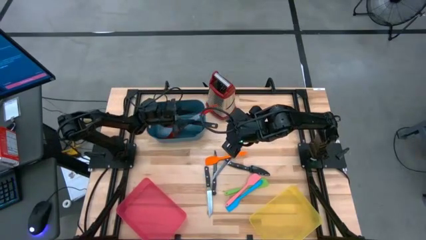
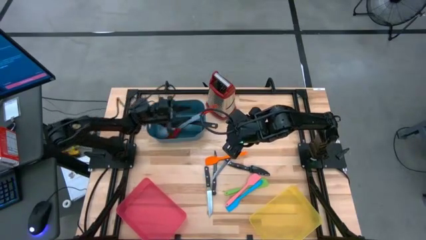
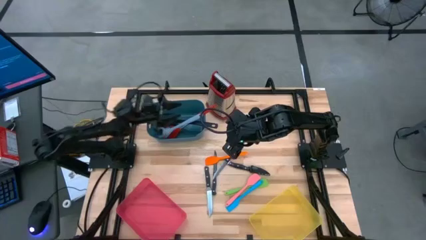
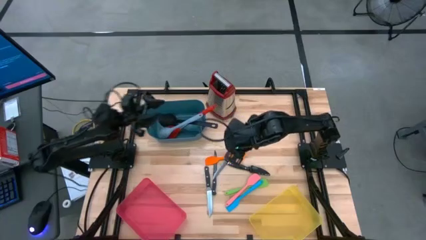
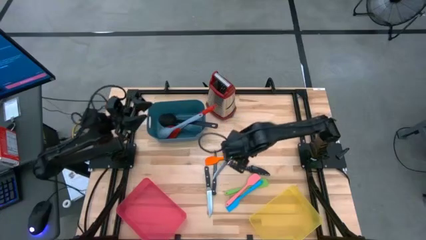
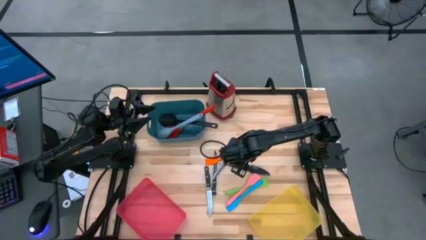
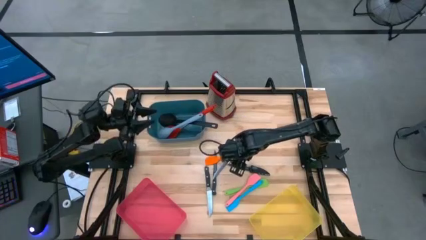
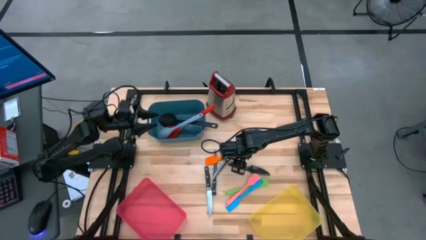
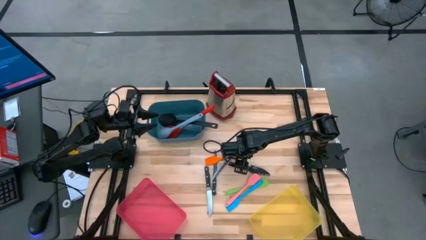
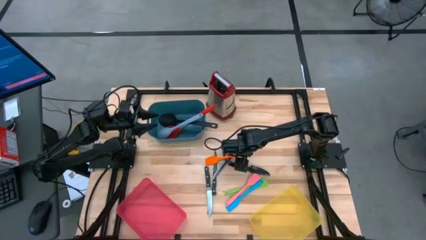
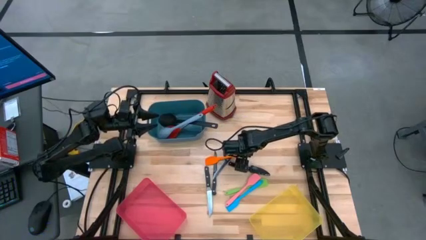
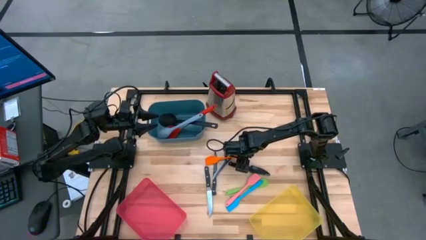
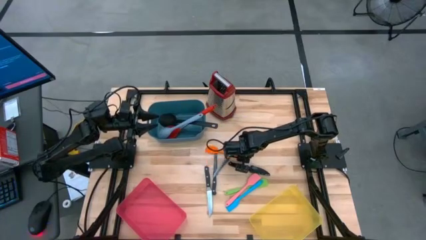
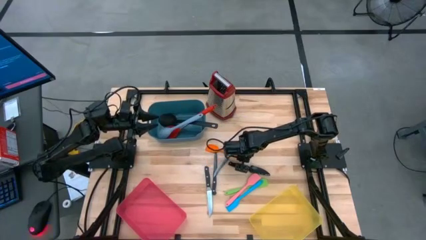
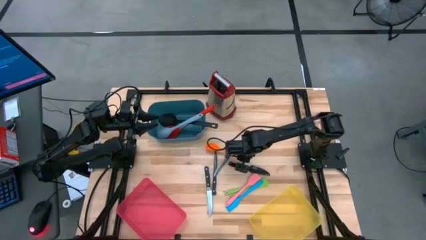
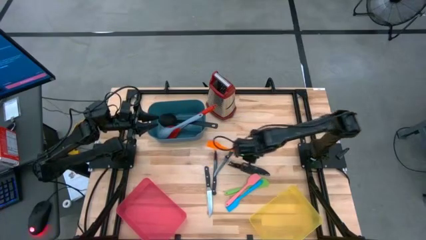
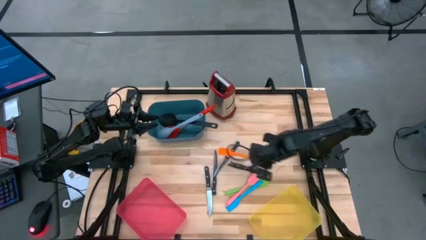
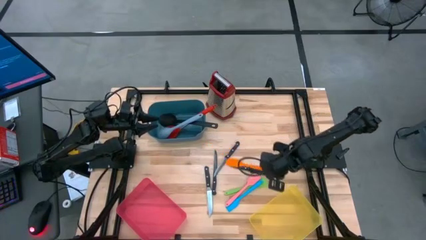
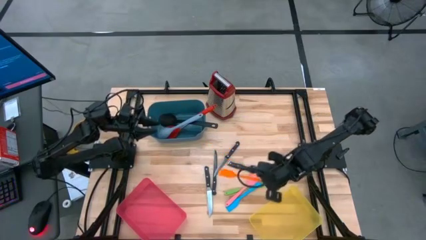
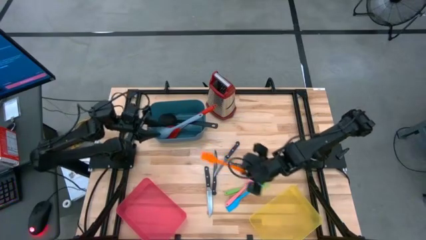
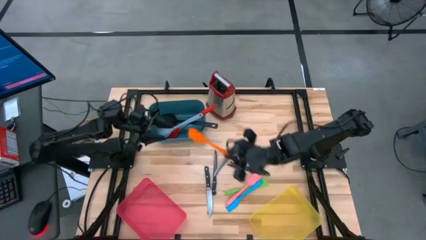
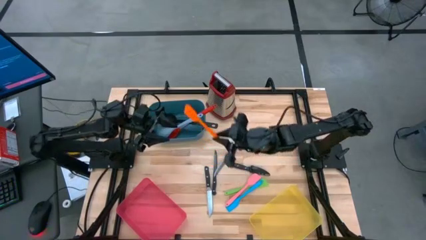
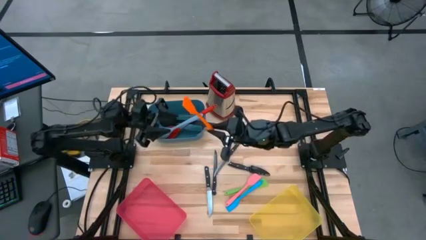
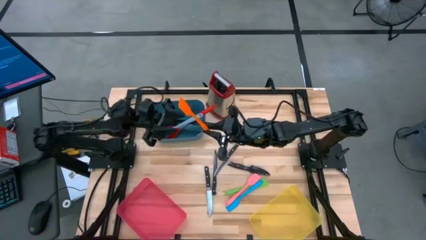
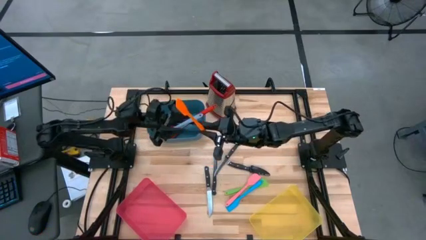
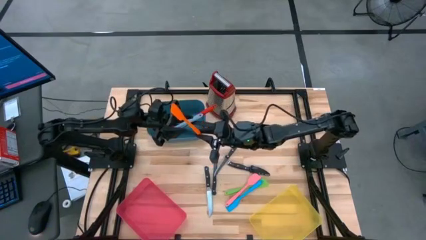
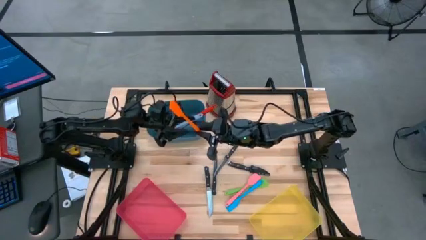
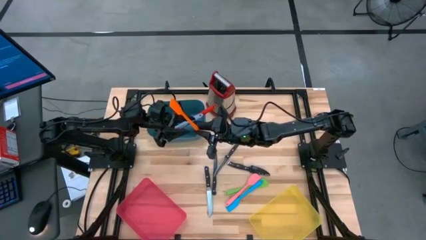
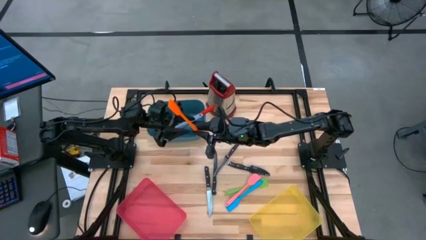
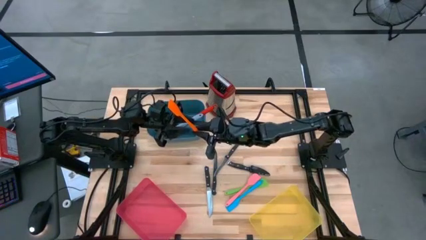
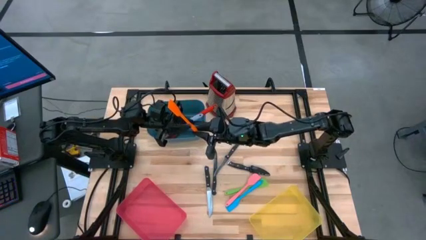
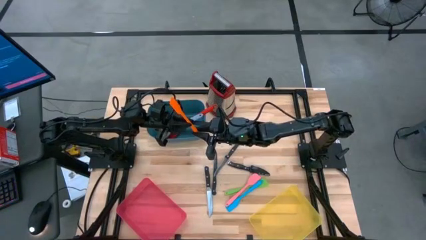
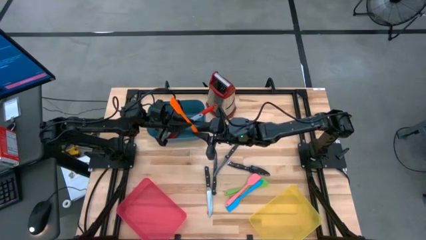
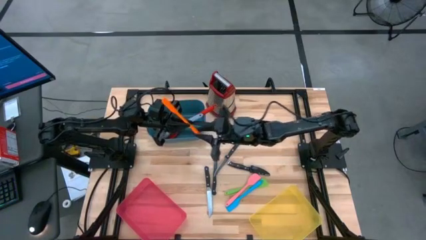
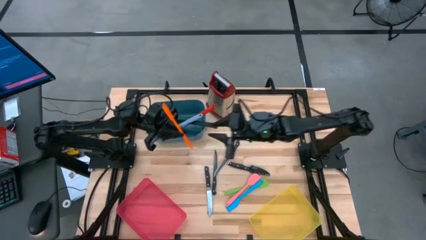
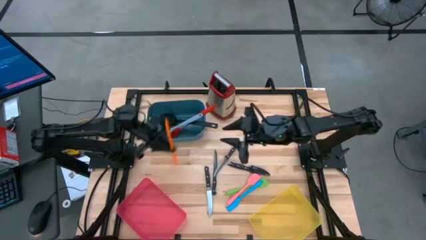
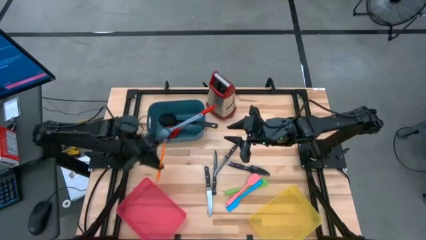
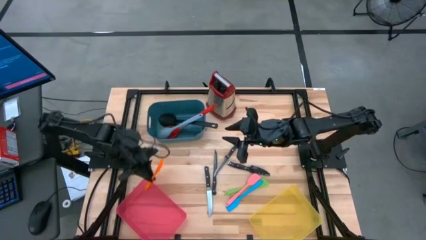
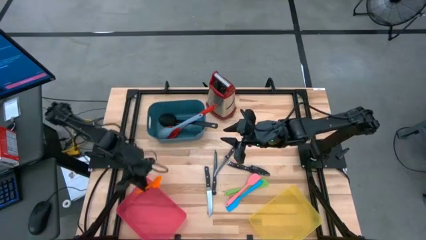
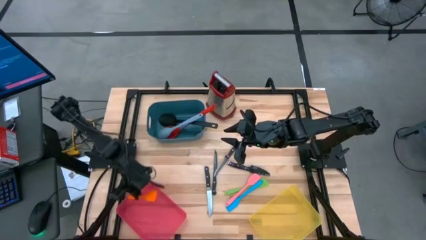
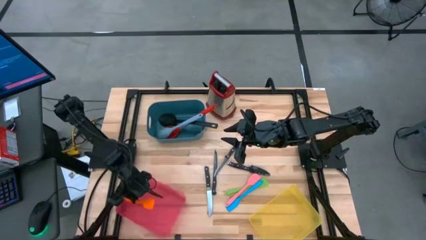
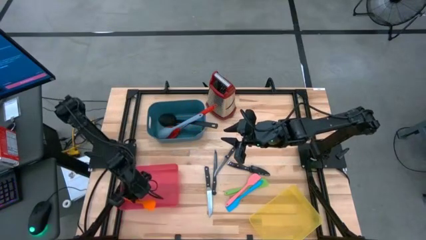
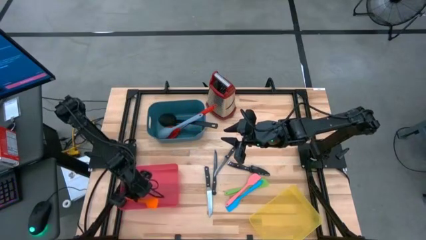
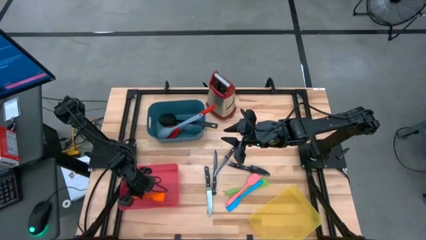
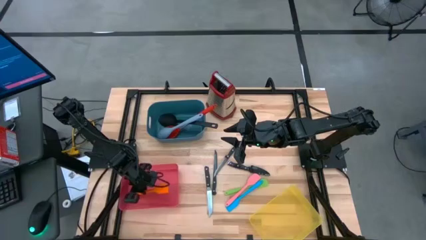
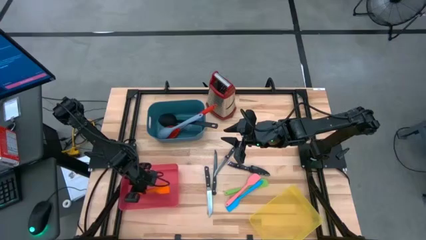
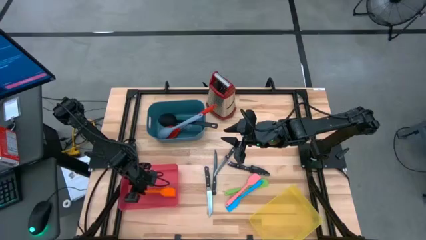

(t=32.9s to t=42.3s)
Task: Pick & Place Kitchen Items
Put the orange spatula into the pink bin

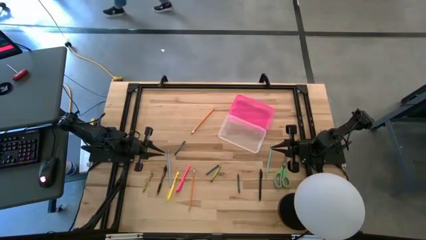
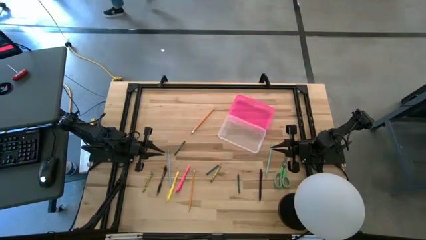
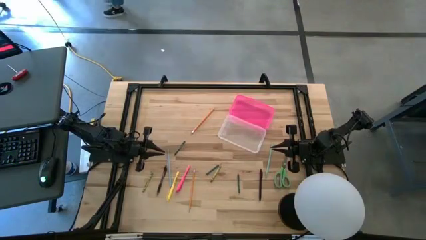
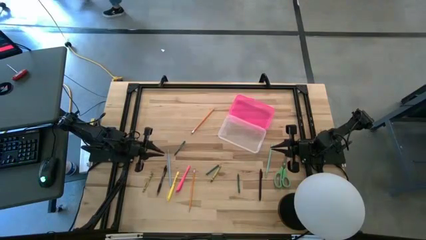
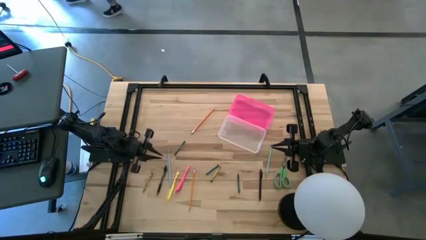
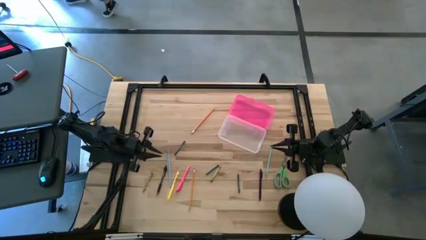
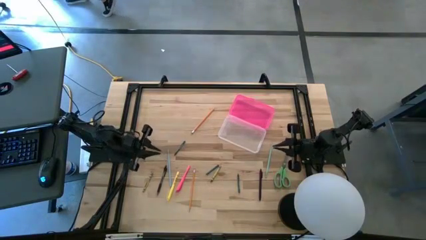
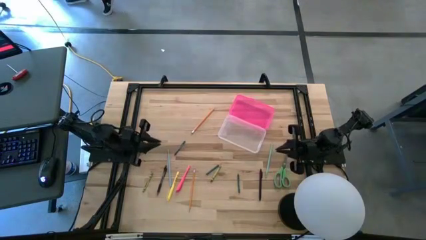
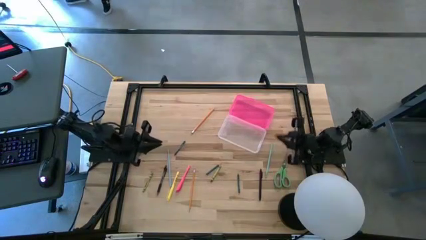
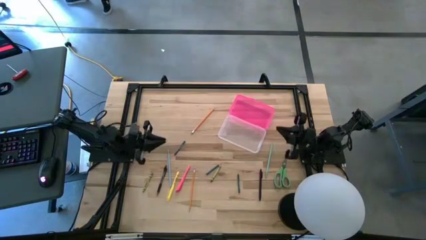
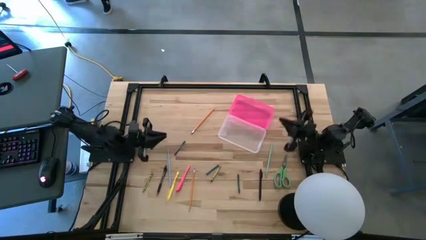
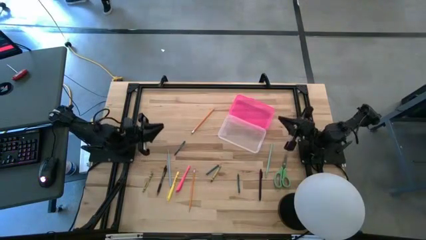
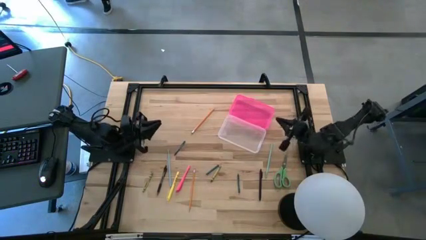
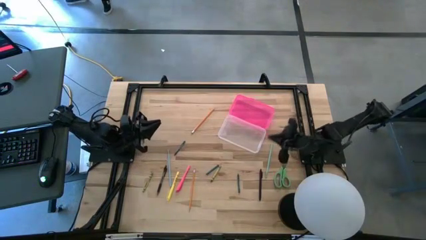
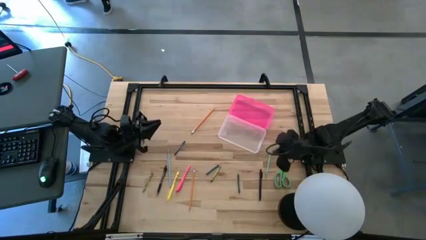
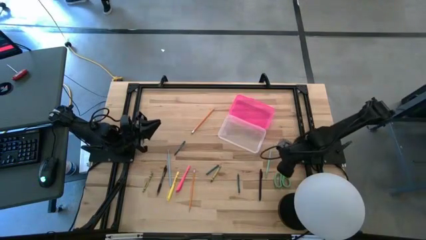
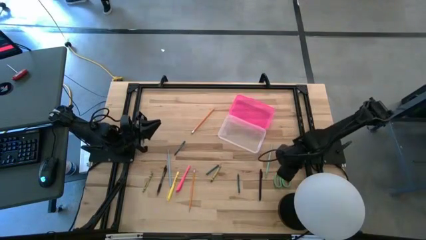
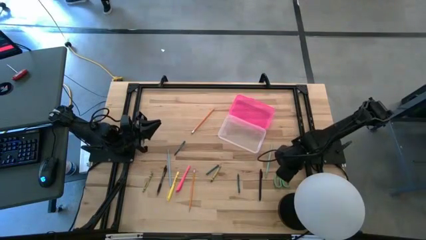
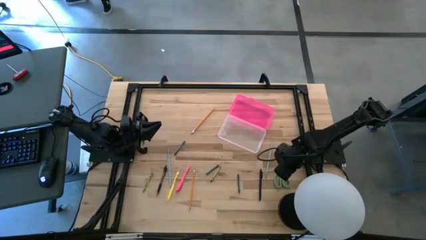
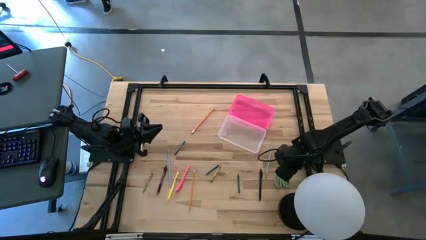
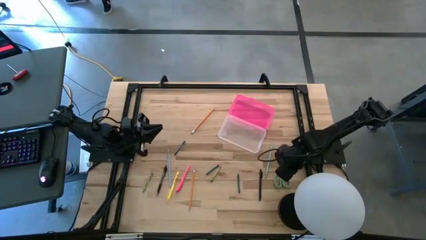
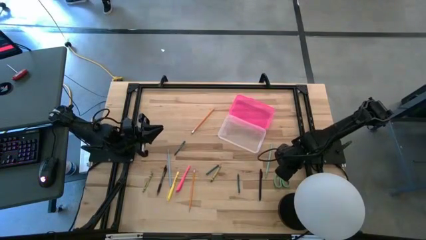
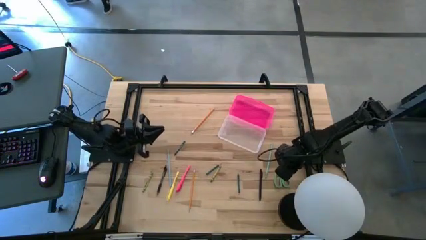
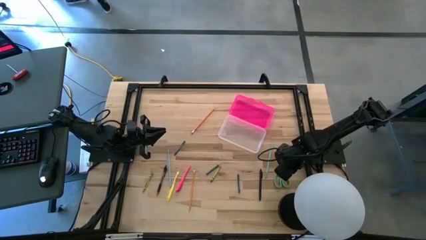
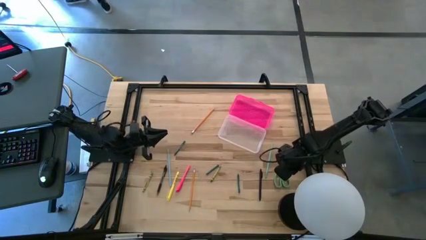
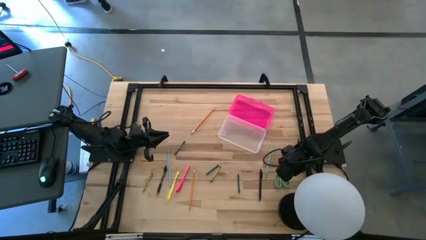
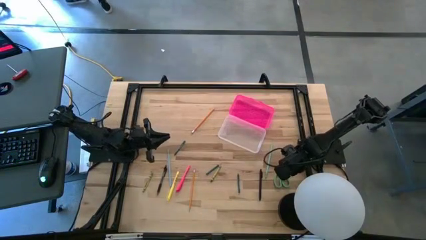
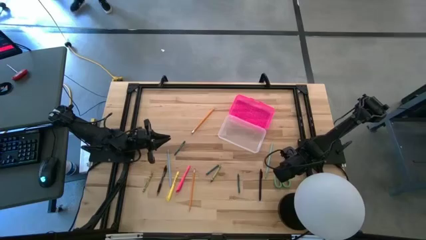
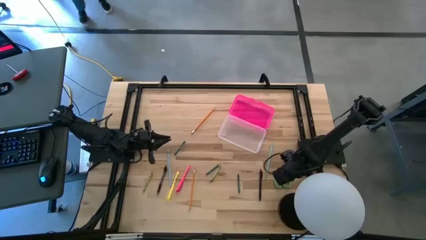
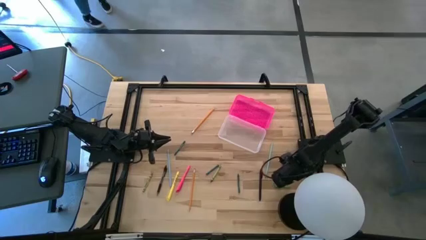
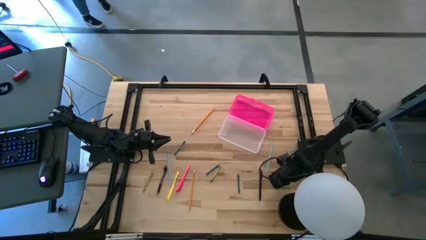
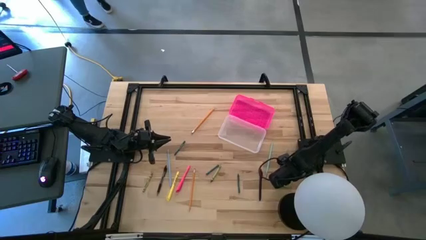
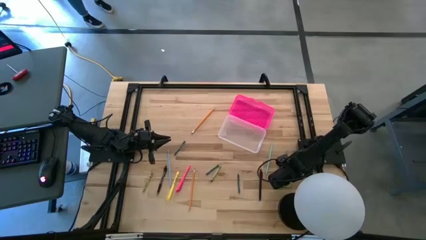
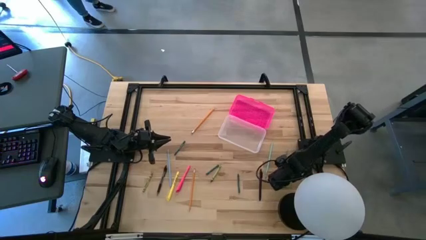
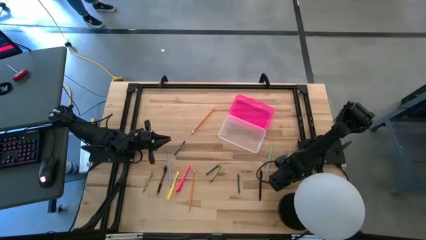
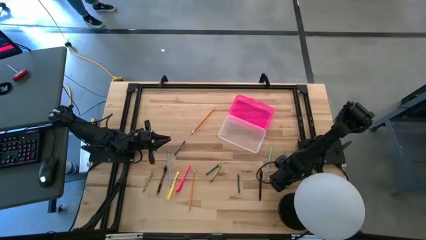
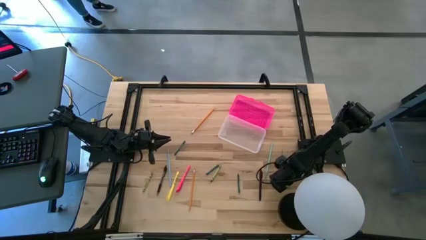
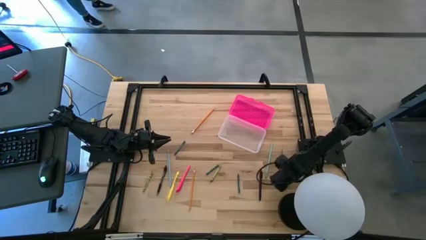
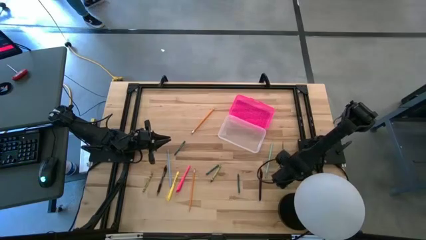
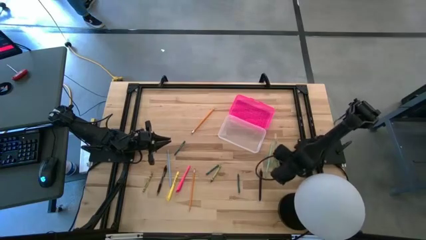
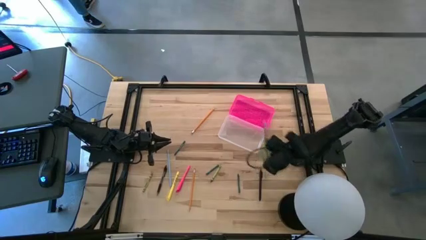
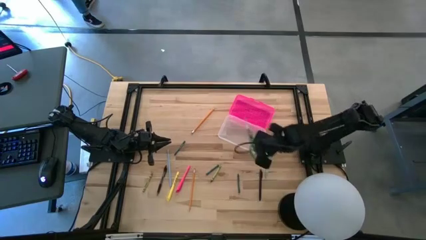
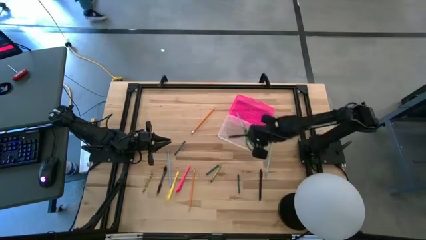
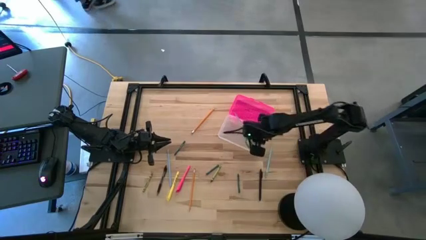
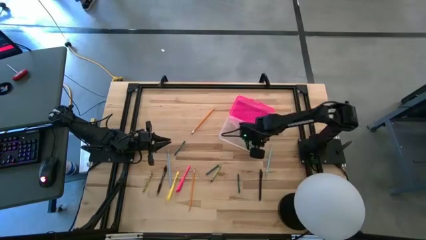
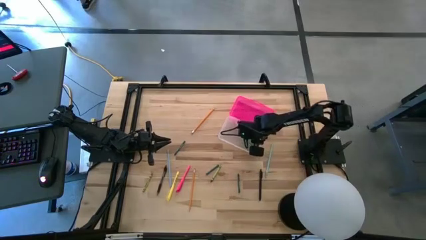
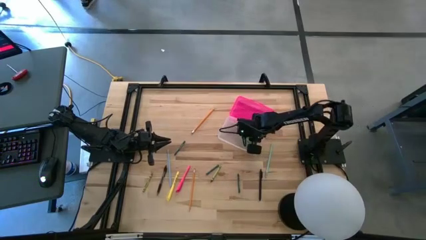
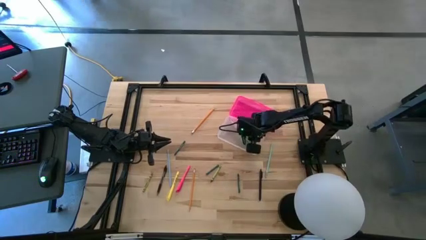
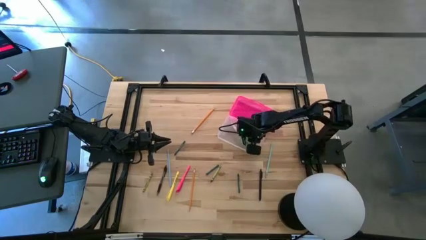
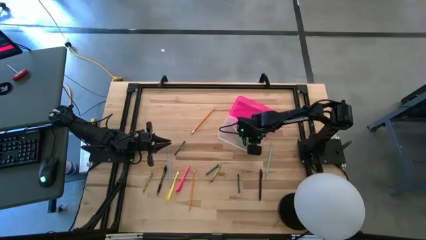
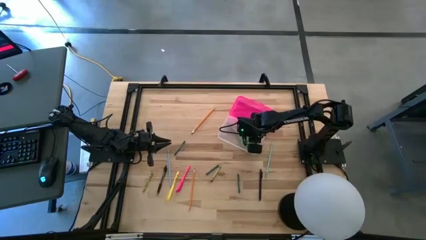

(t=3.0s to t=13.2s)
Task: Pick & place school supplies into a supply box
Put the green scissors into the pink supply box
